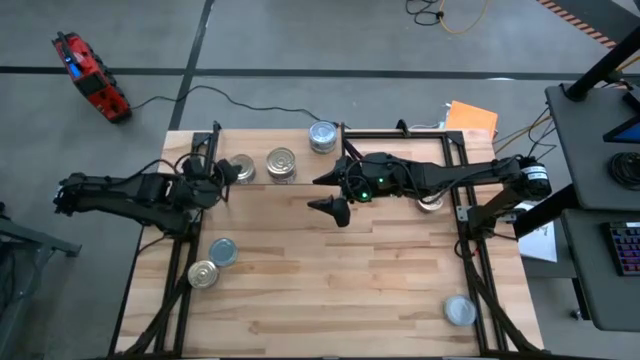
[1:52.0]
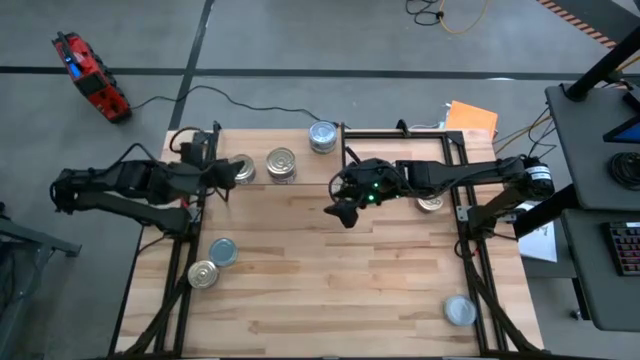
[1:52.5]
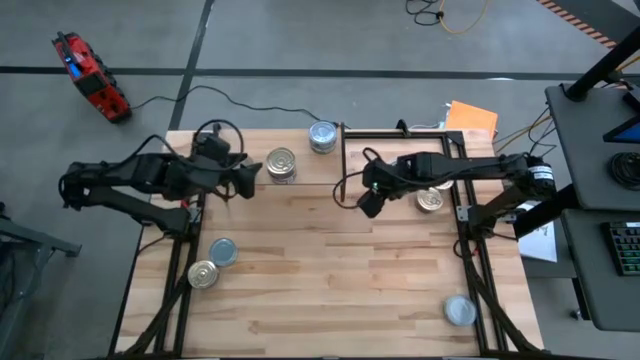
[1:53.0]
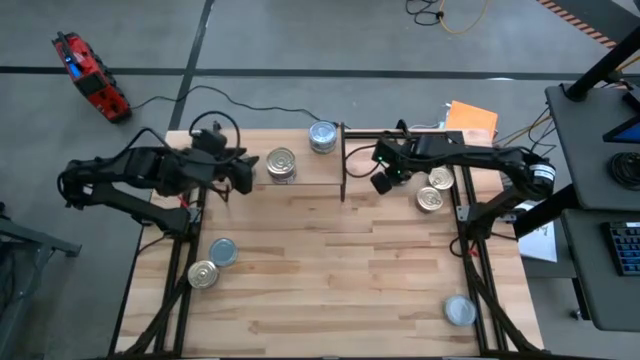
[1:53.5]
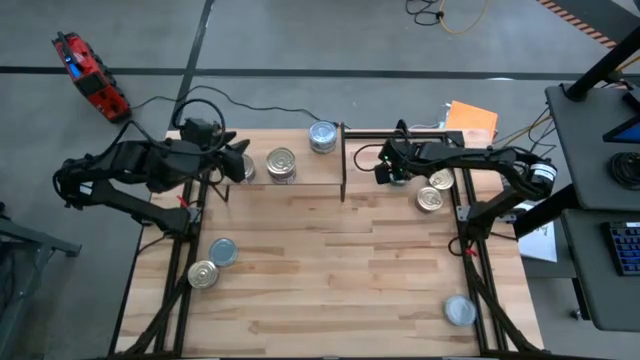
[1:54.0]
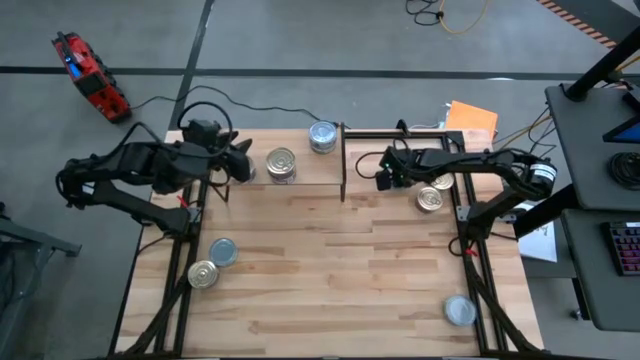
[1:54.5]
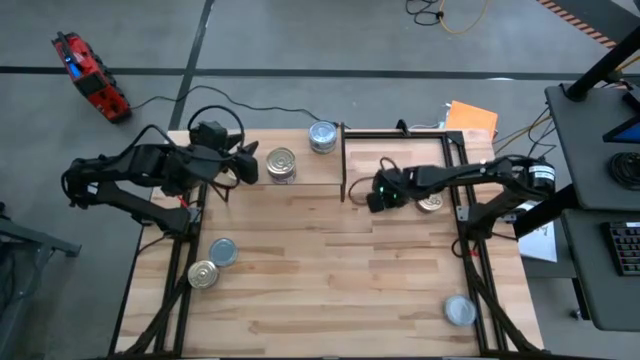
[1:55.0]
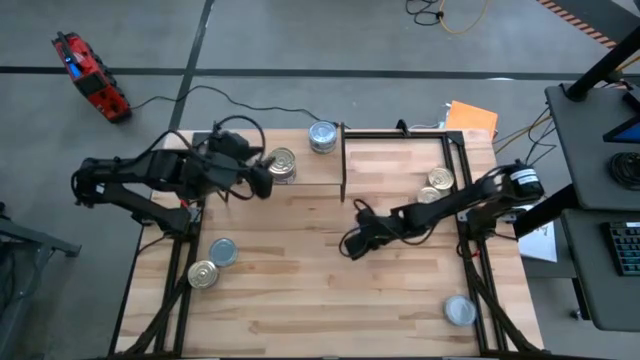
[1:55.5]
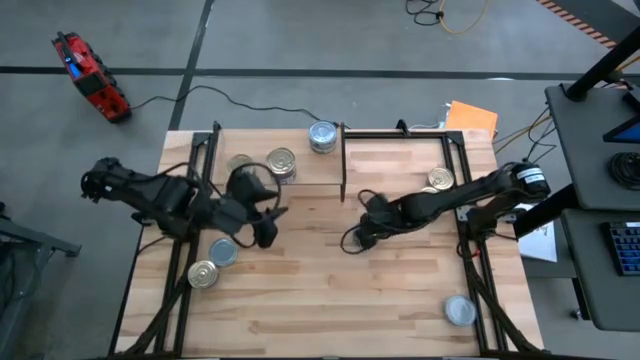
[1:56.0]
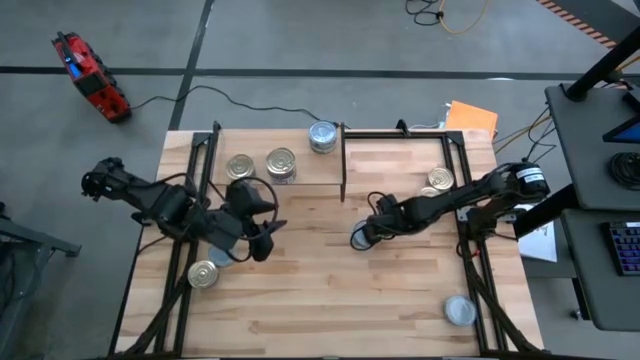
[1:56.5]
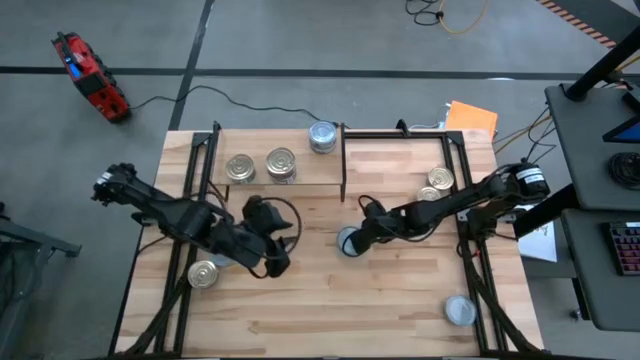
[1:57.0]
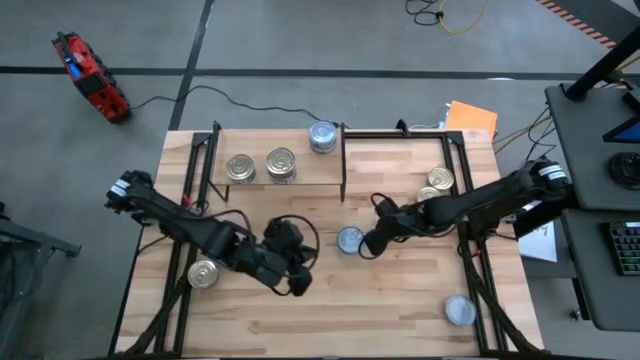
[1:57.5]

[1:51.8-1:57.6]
Task: Stack canned seafood by type on shelf
Move the blue tuna can to the center of the table

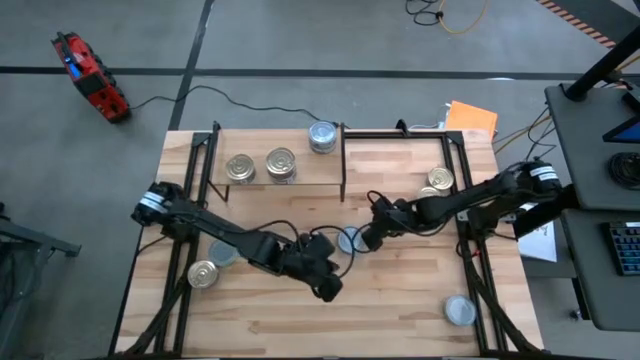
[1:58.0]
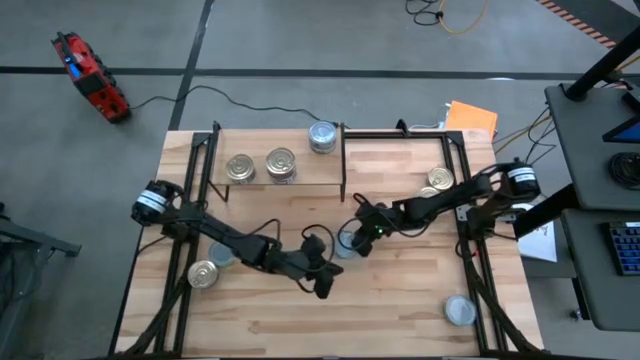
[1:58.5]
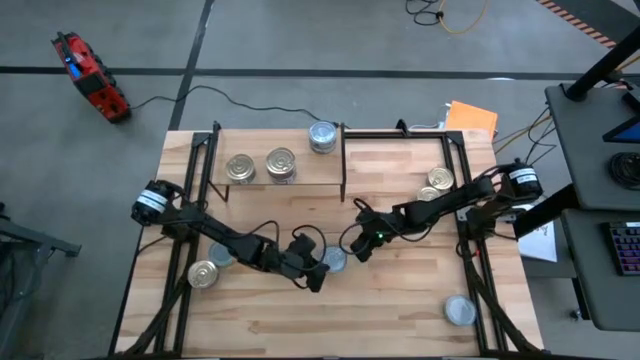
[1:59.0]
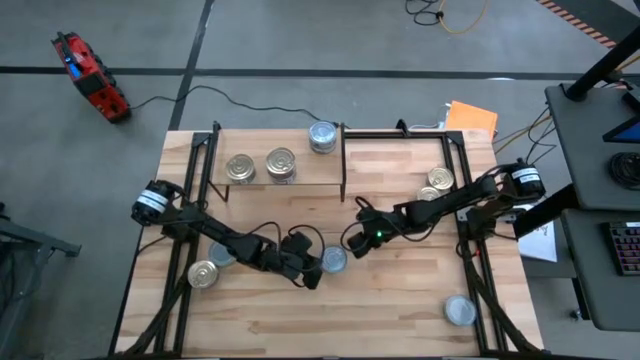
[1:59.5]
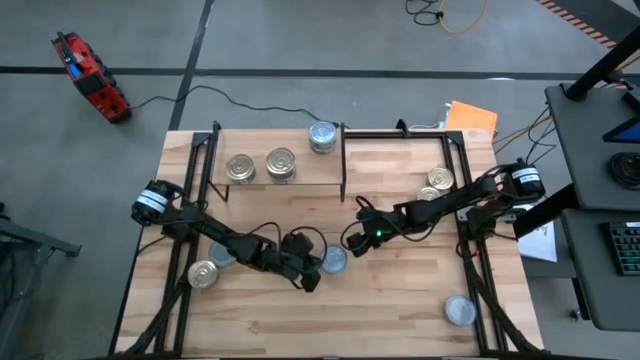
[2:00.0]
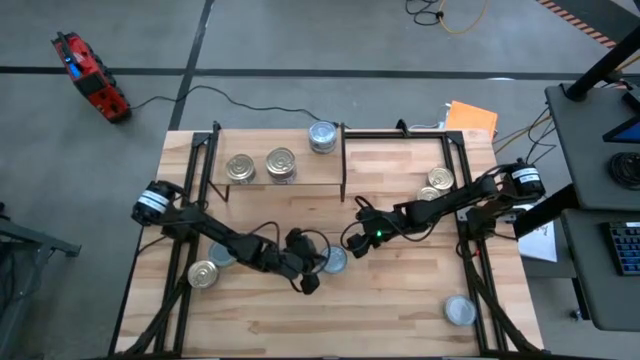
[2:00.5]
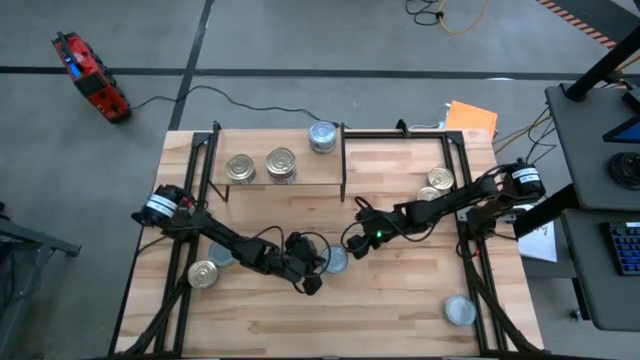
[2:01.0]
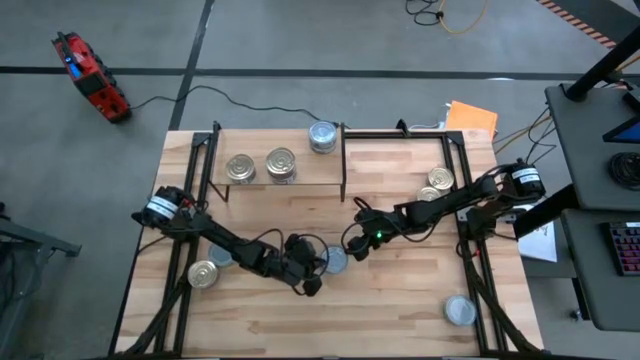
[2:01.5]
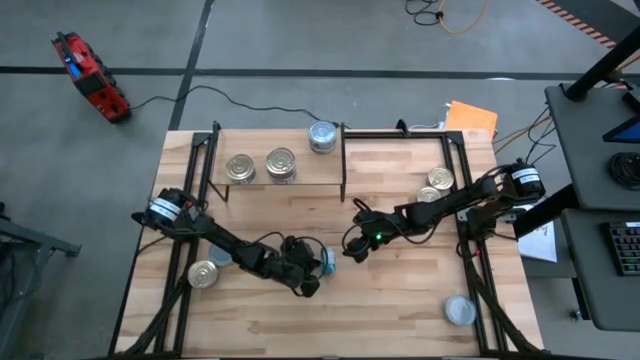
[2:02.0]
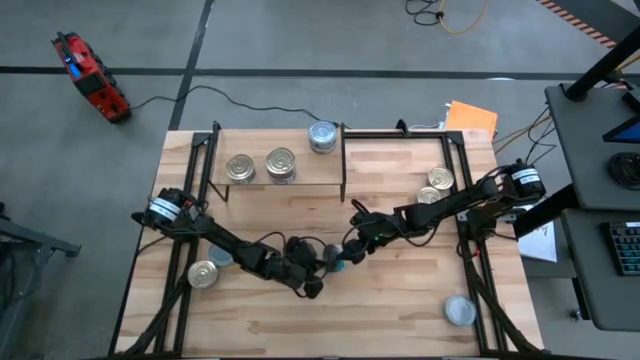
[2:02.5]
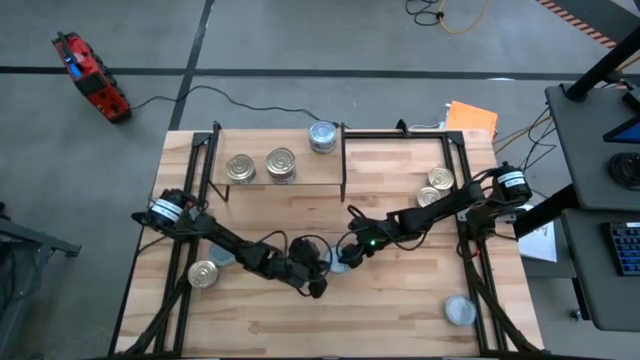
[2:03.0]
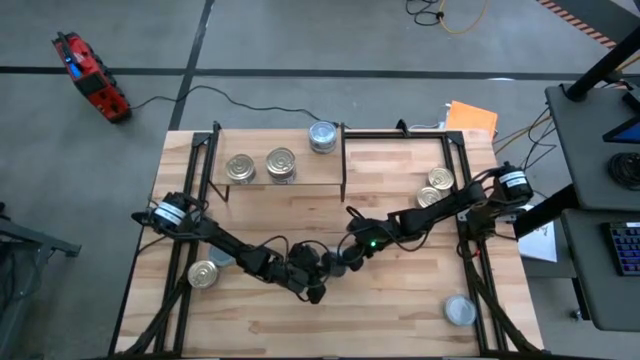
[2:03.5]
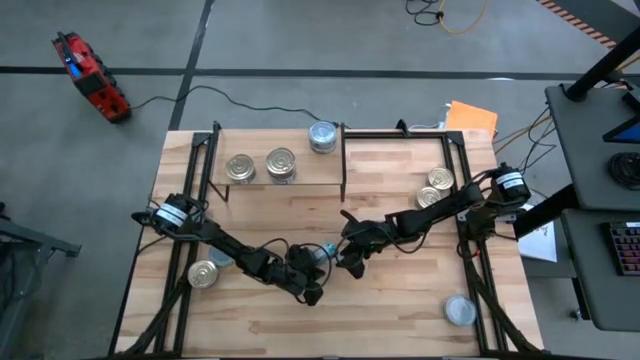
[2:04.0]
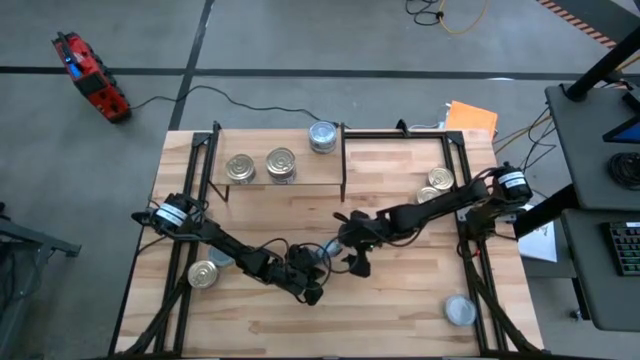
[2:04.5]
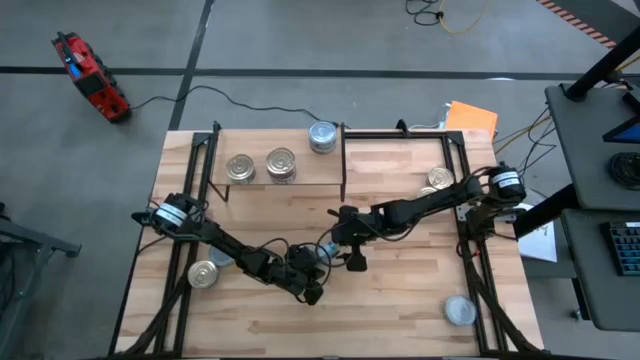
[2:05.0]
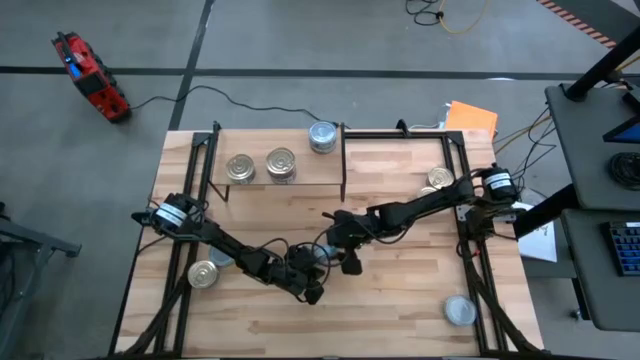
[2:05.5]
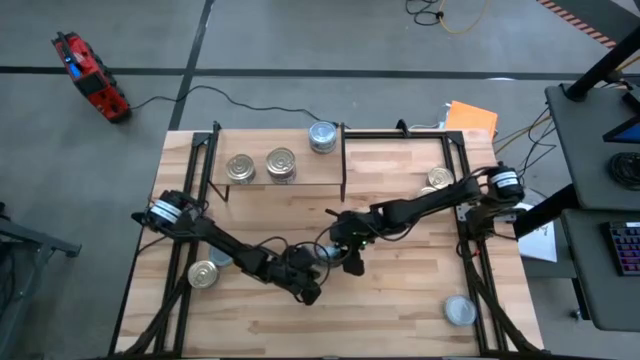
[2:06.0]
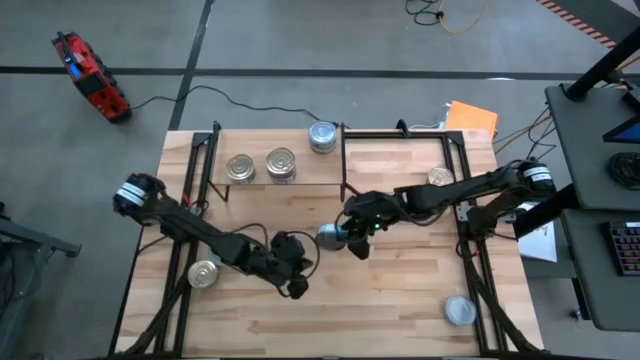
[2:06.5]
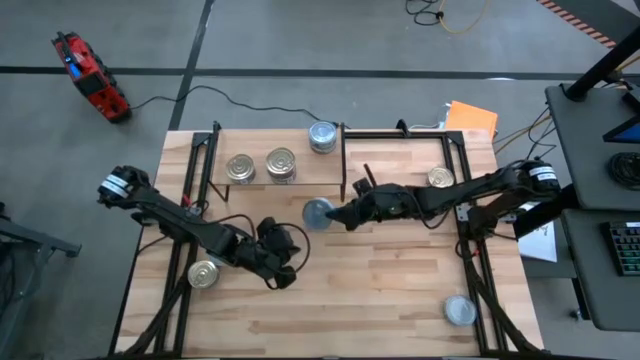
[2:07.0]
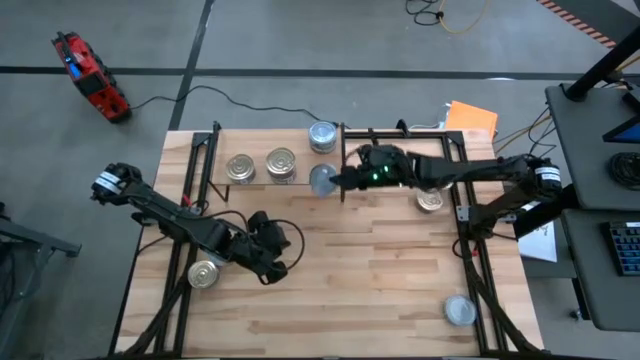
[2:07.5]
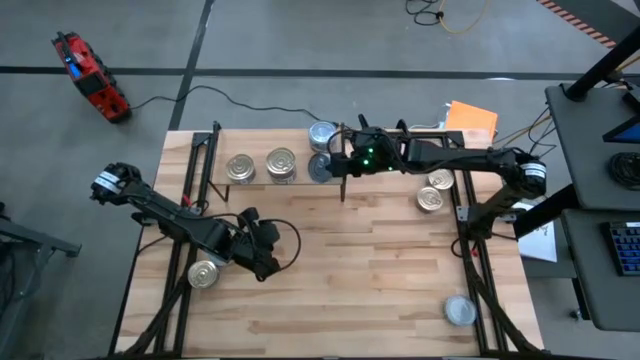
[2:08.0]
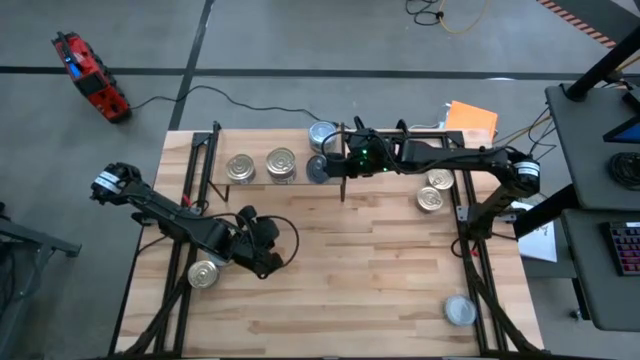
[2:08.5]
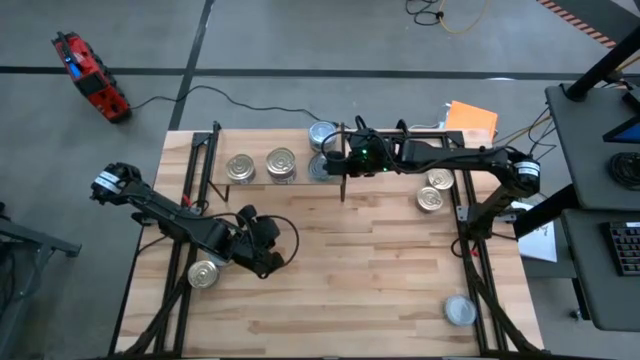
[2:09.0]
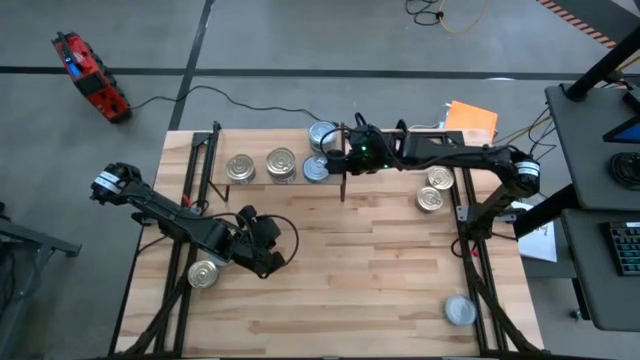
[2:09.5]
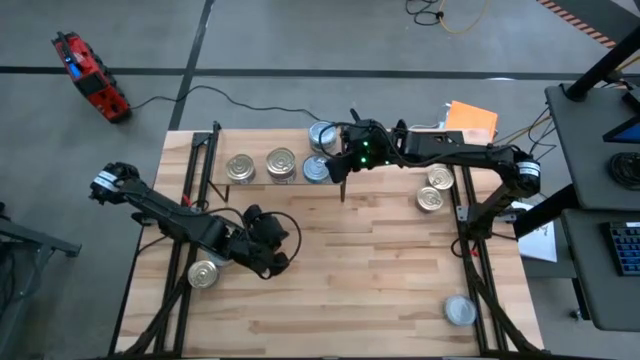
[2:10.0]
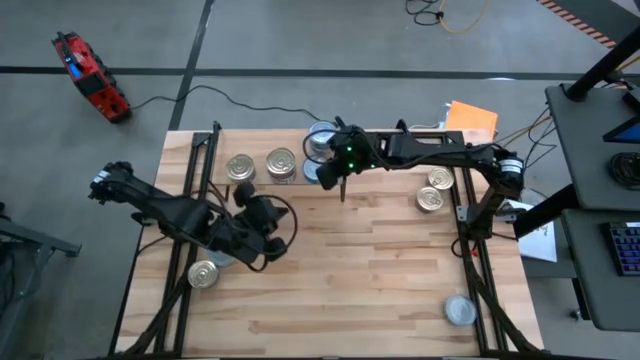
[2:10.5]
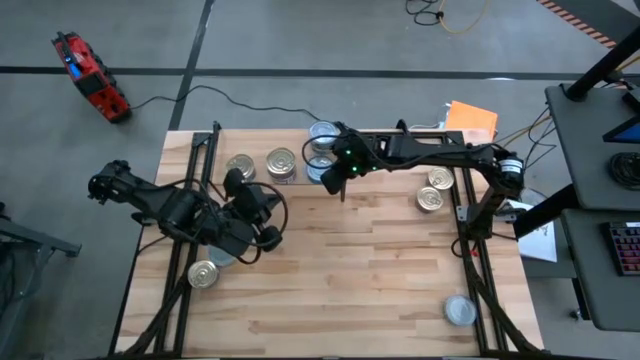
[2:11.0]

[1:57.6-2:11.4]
Put the blue tuna can on the shelf

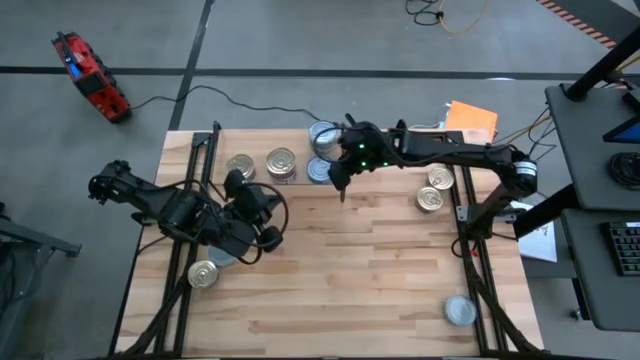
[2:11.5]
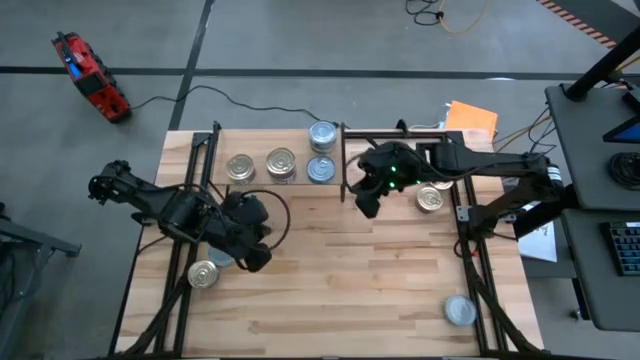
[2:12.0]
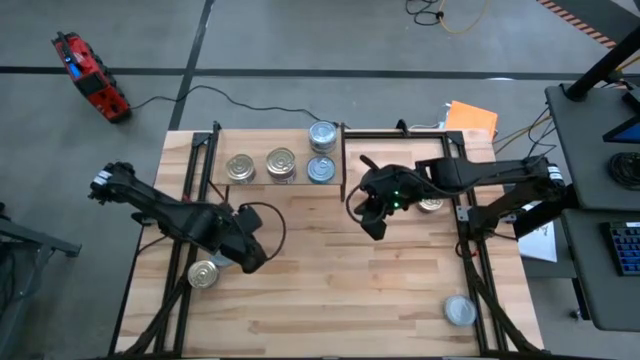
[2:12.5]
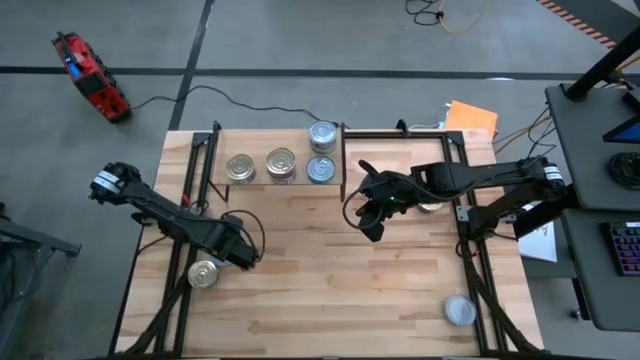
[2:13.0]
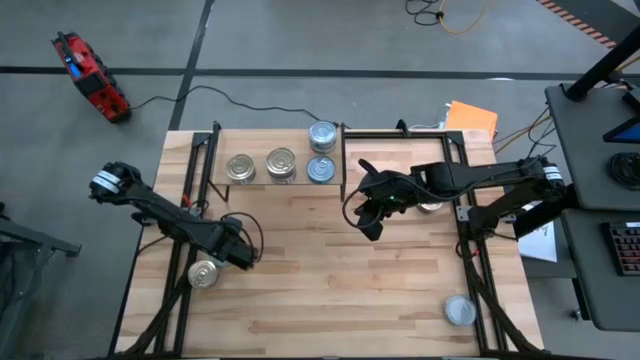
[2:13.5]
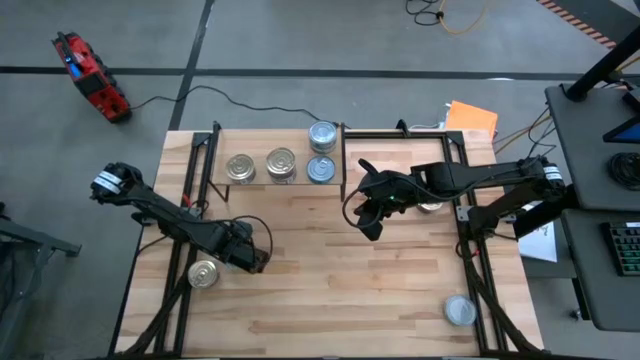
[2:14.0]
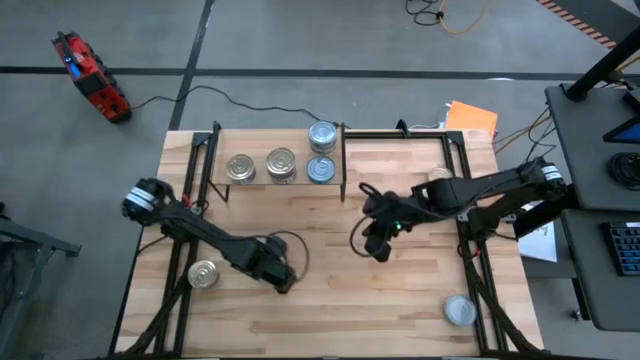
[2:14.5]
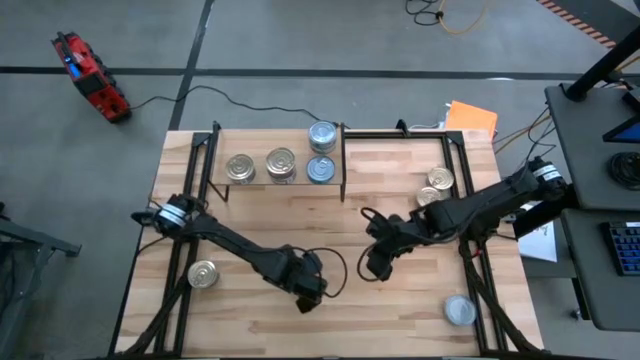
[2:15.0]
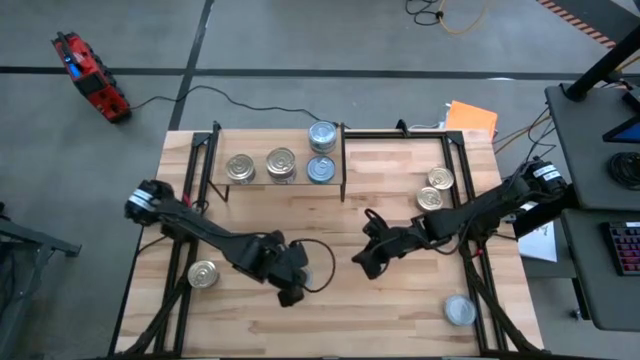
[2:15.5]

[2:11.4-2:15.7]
Move the green tuna can to the center of the table
